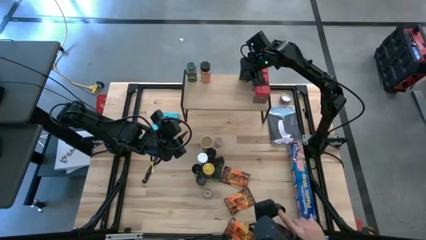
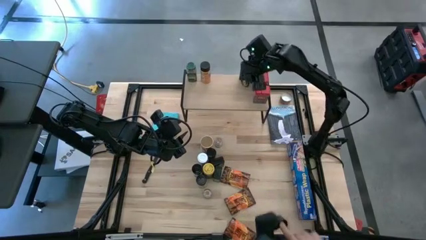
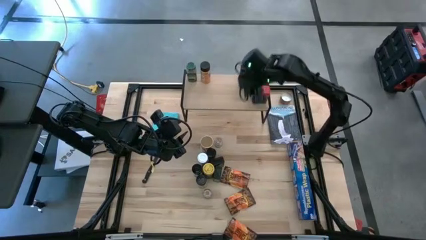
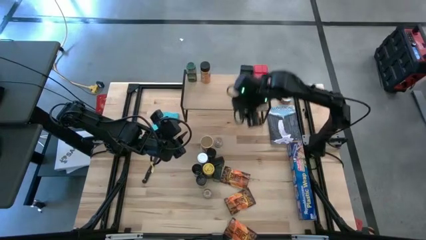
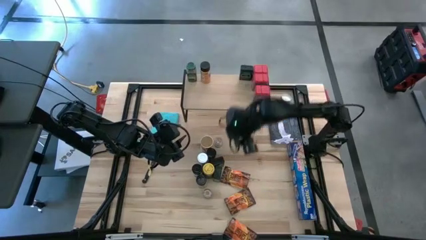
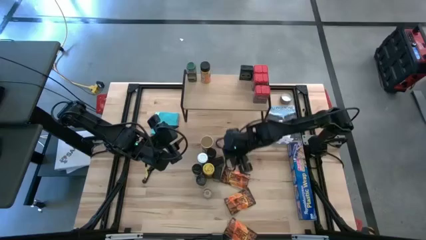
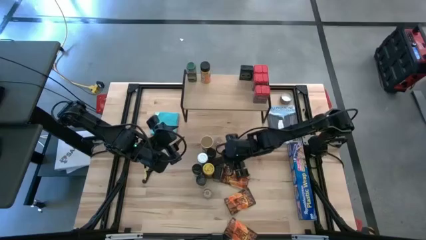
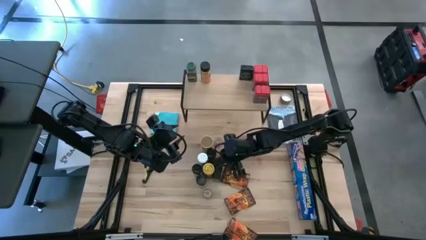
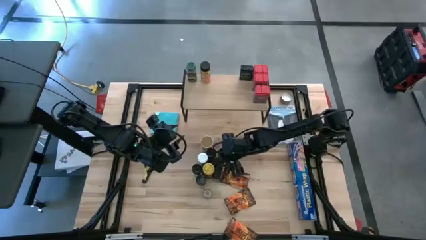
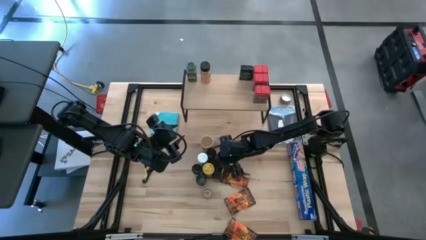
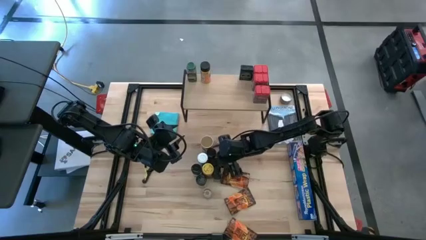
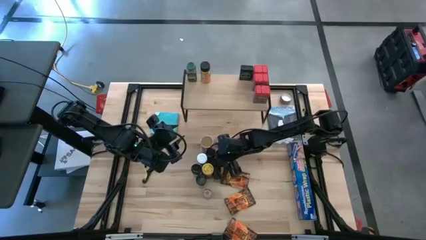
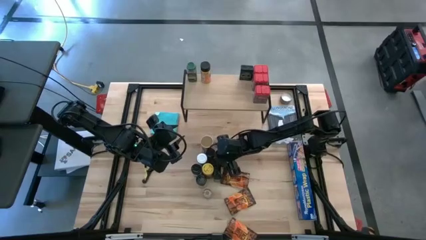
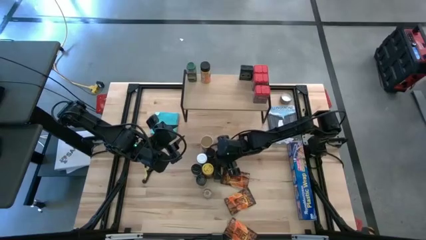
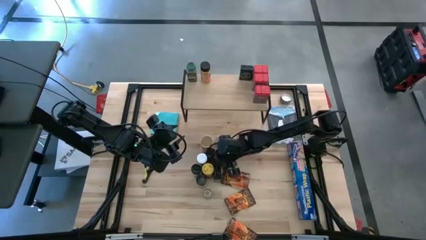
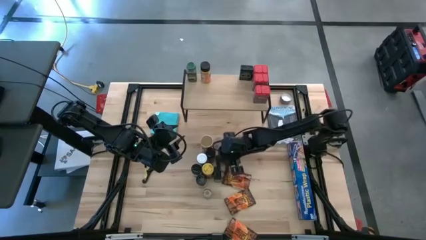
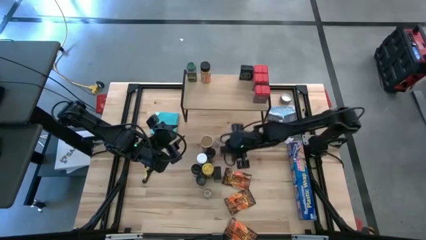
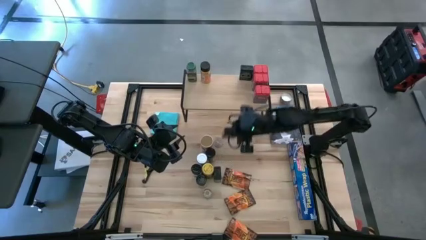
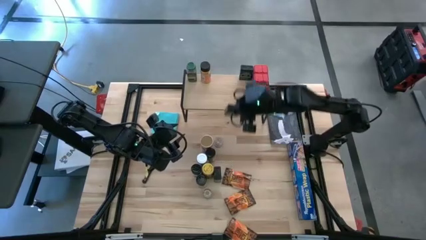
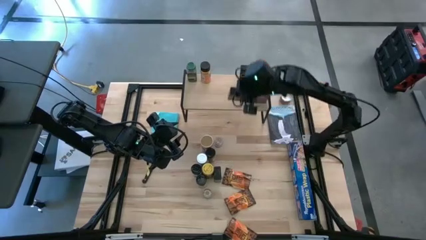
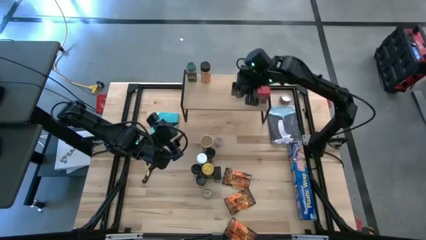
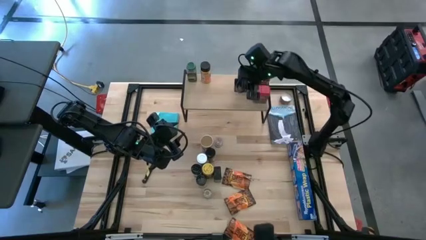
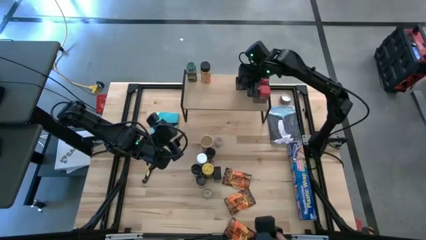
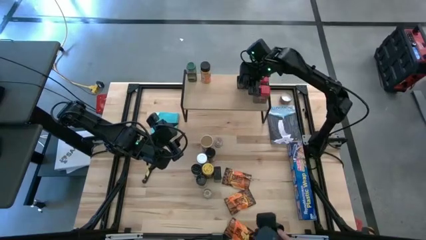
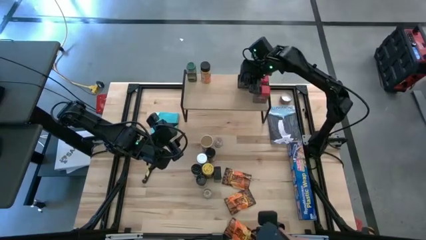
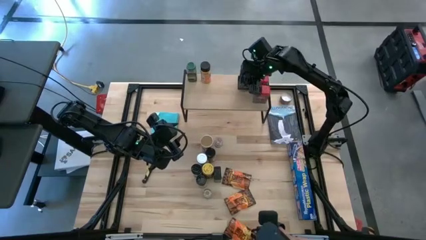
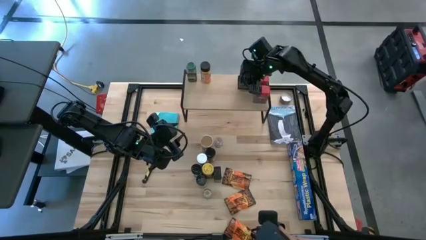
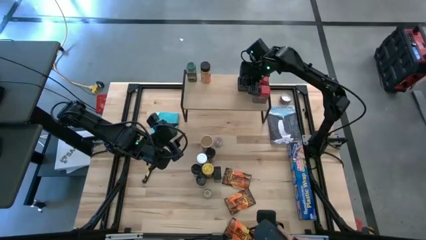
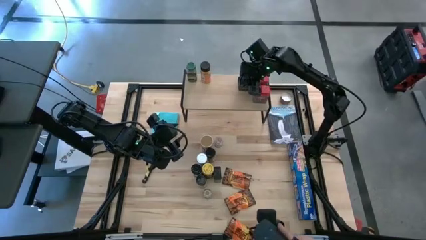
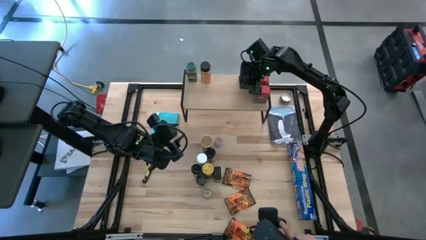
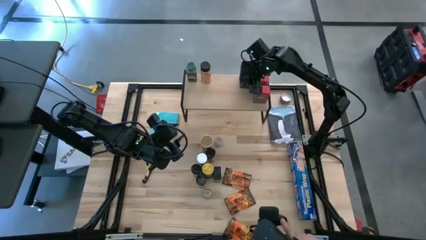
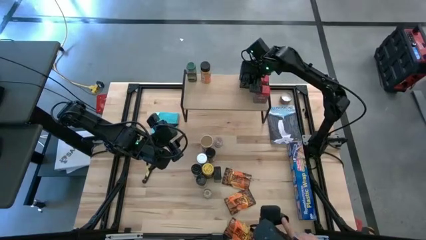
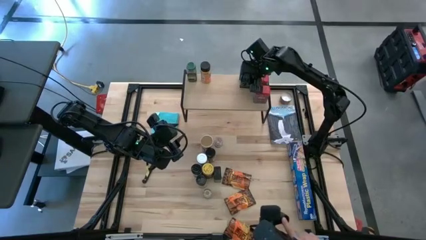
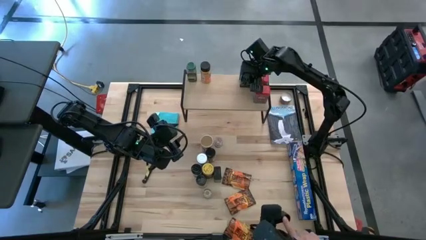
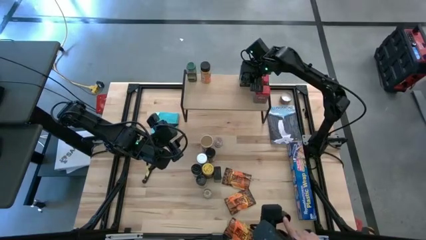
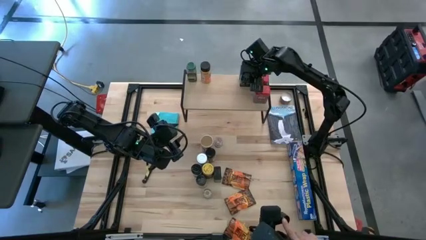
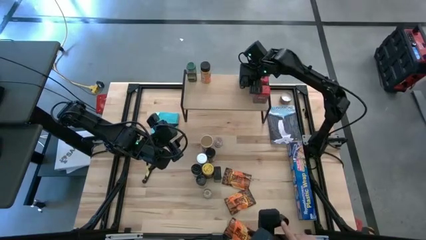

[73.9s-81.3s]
Task: Shelf spices
Put the black seasoning can on the shelf

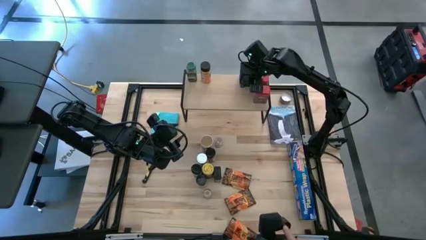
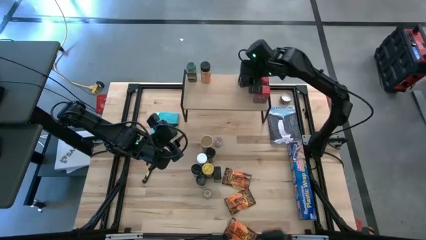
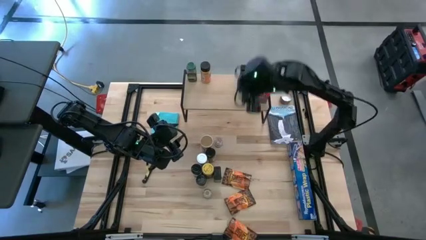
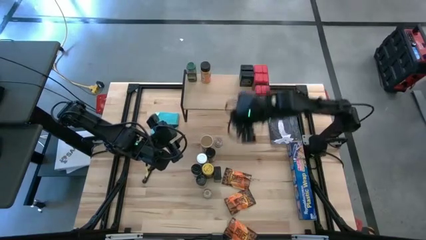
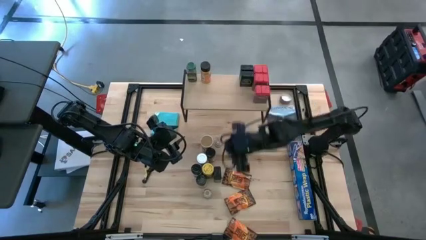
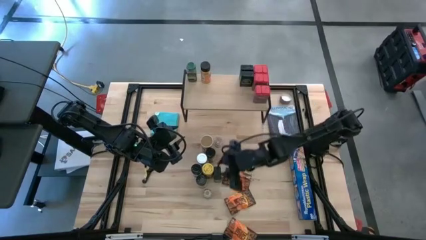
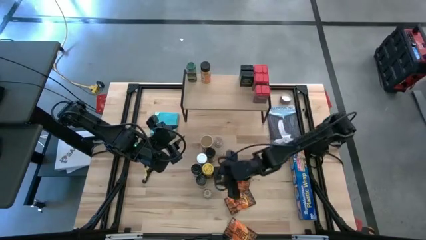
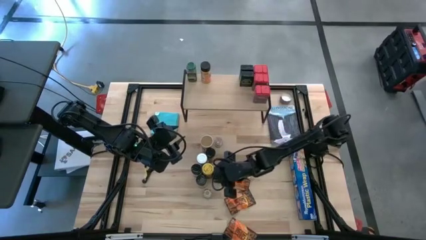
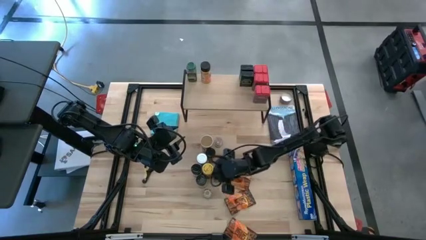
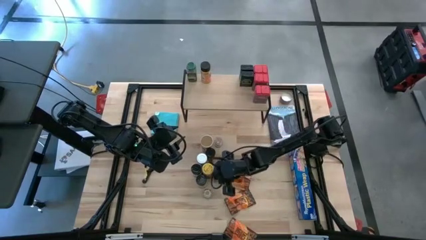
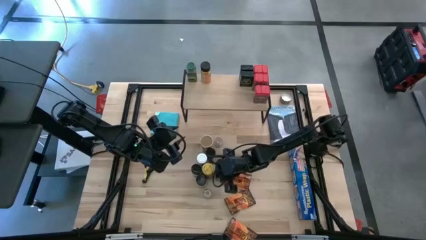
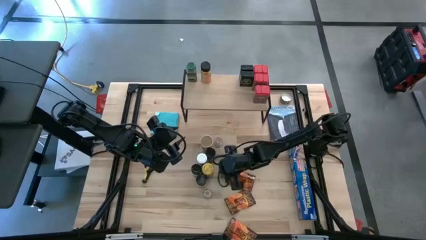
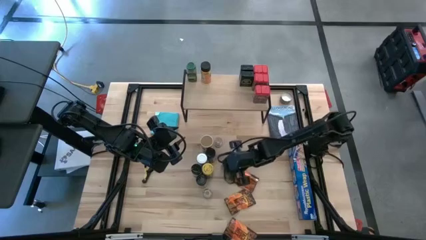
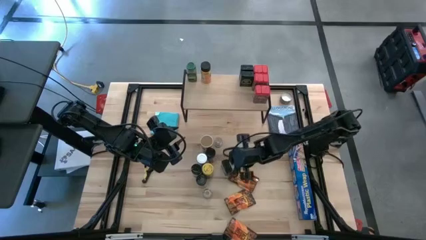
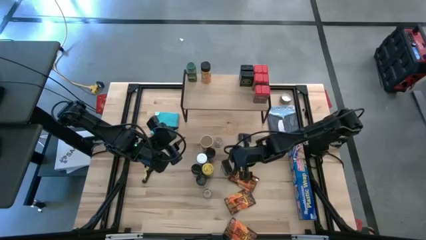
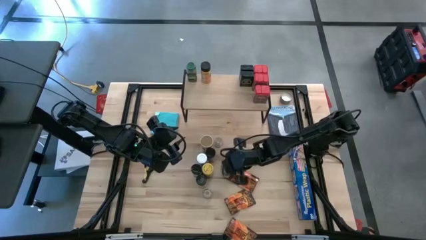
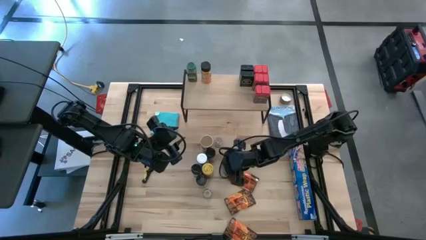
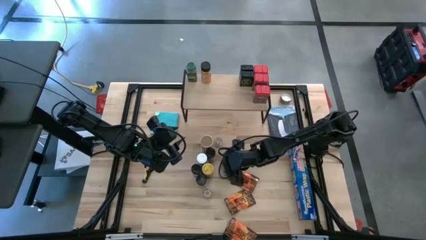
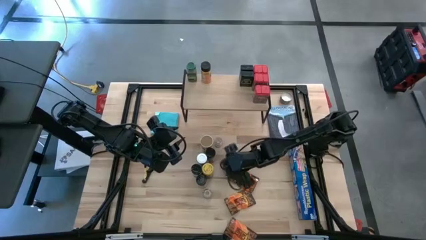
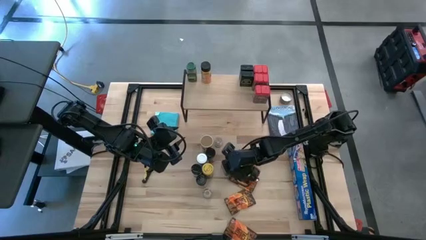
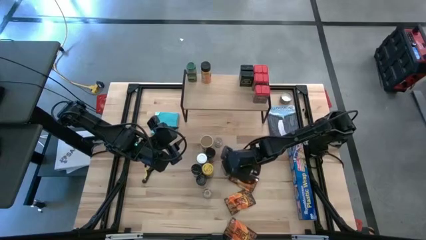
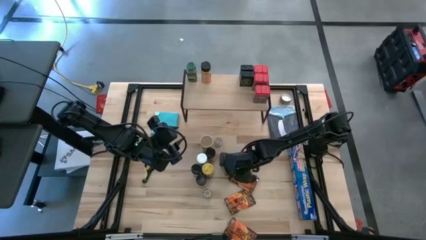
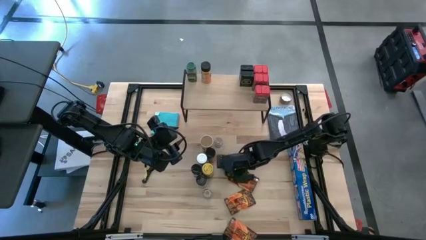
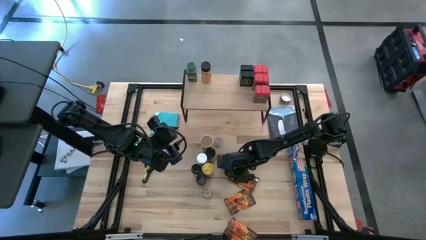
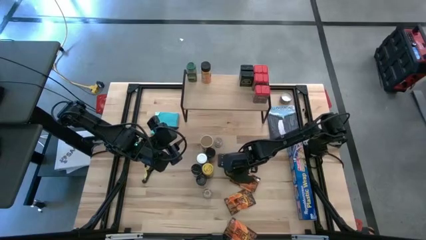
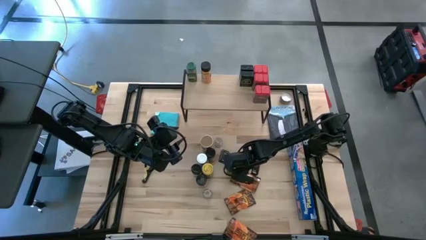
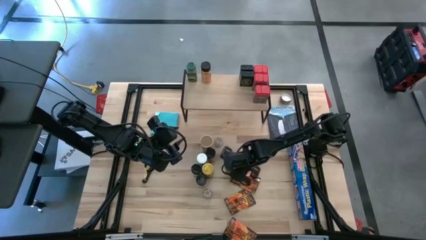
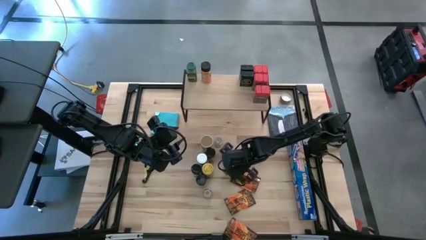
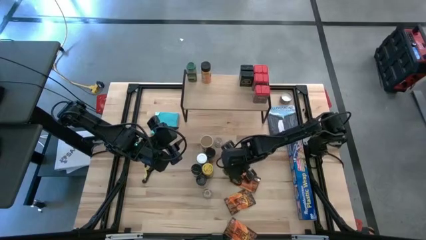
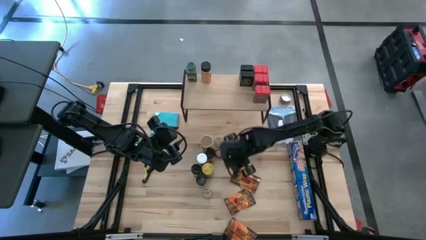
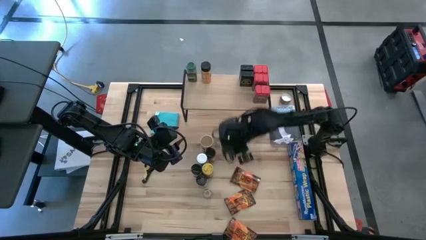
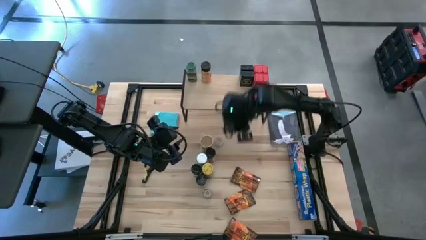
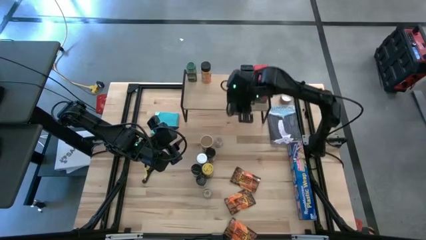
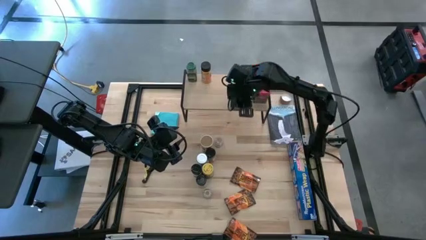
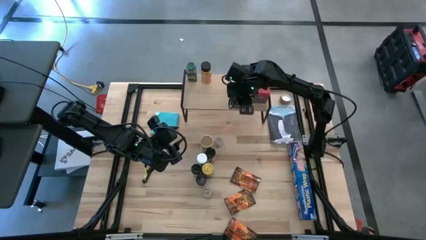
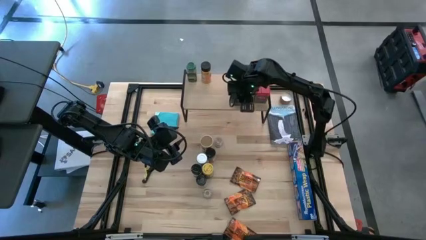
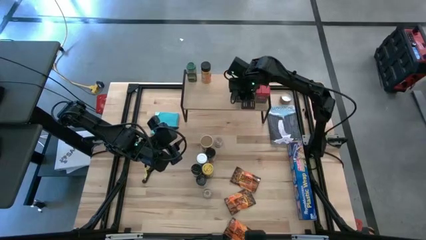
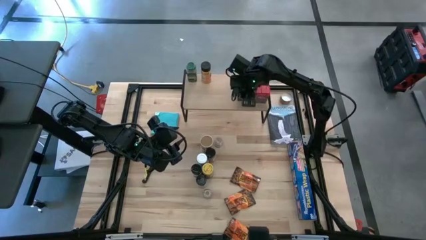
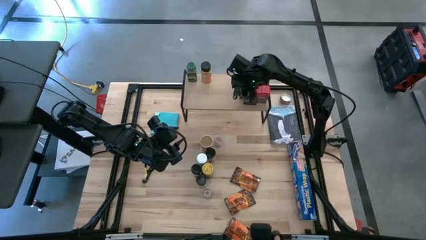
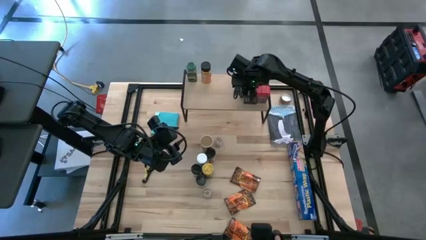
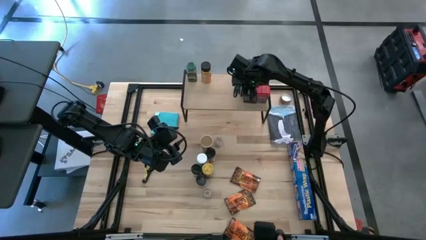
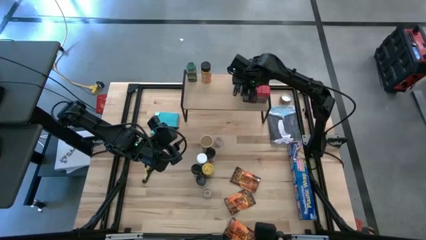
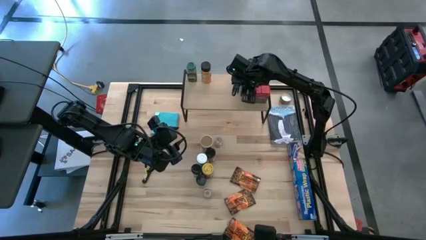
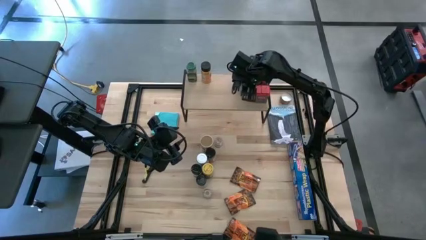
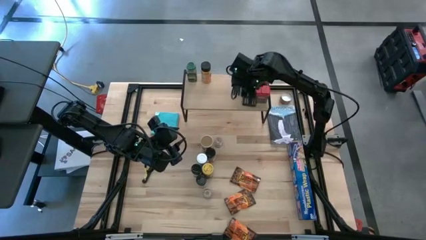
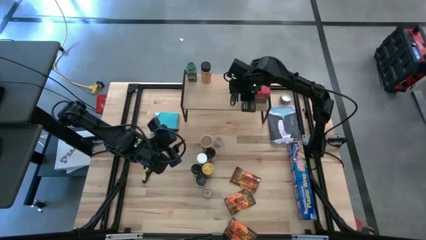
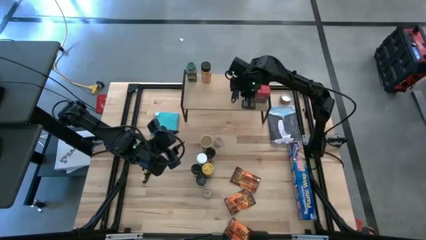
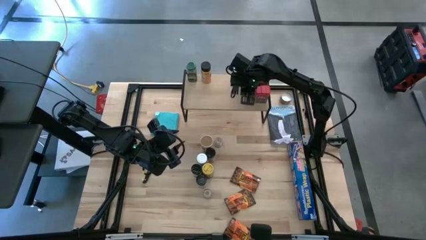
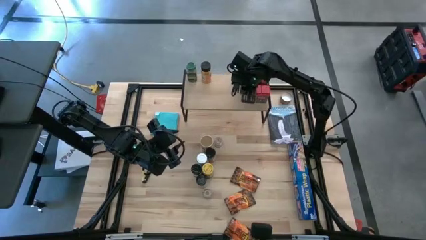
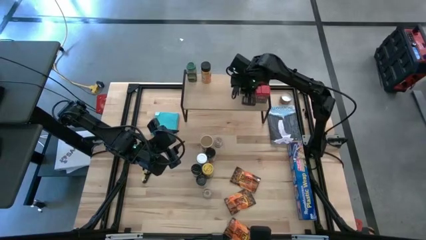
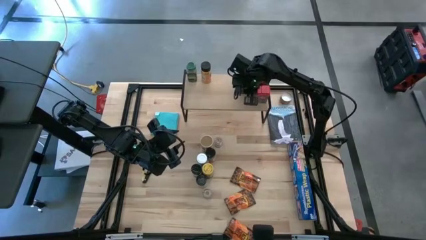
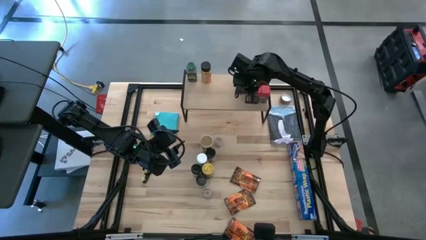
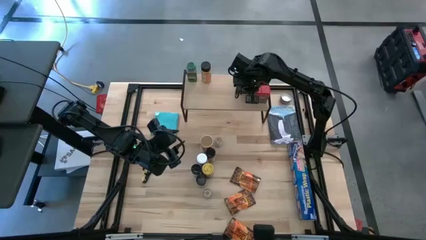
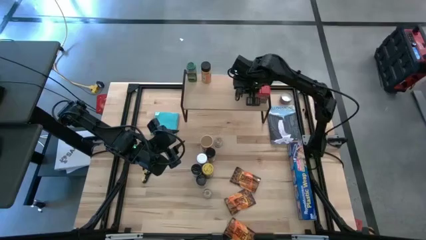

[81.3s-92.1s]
Put the black seasoning can on the shelf
